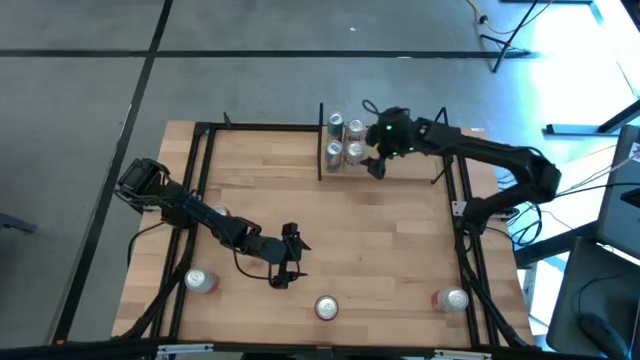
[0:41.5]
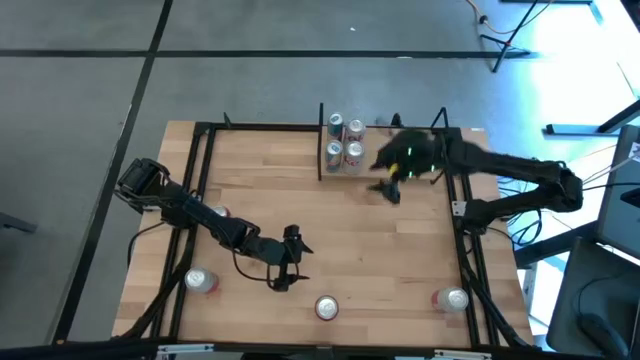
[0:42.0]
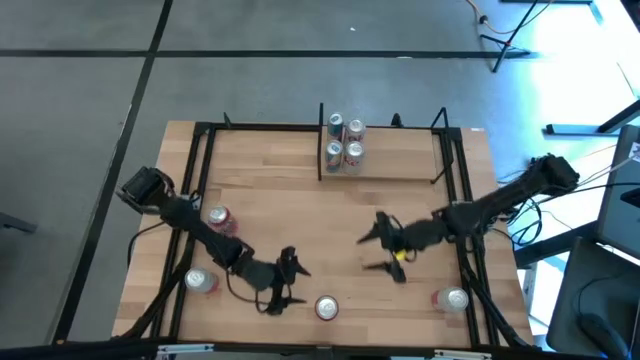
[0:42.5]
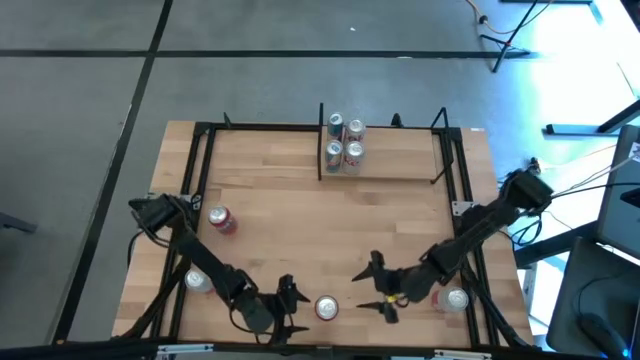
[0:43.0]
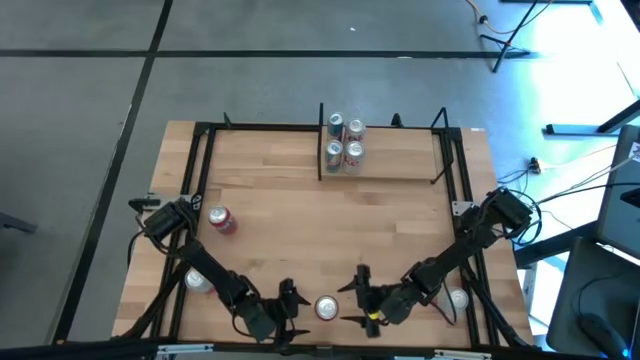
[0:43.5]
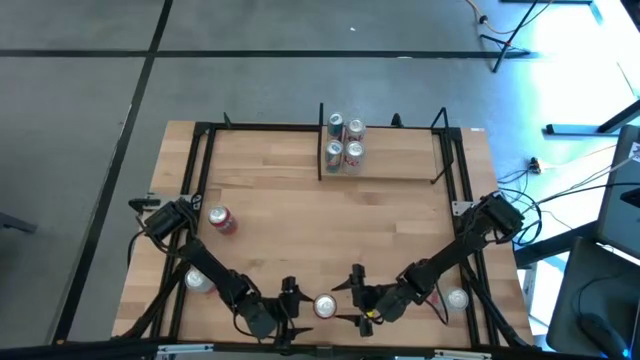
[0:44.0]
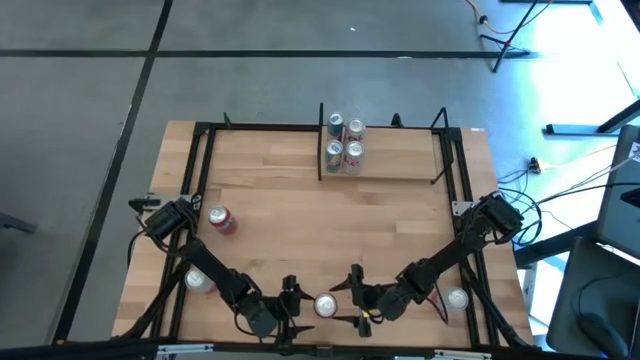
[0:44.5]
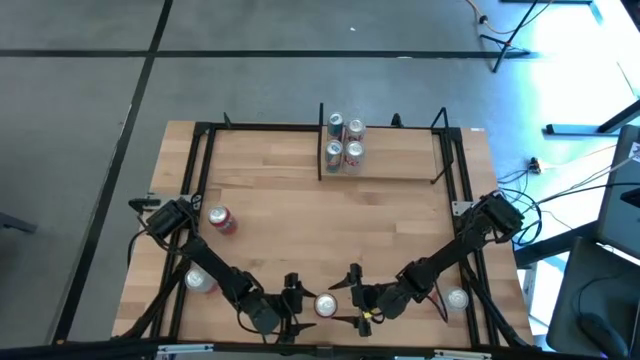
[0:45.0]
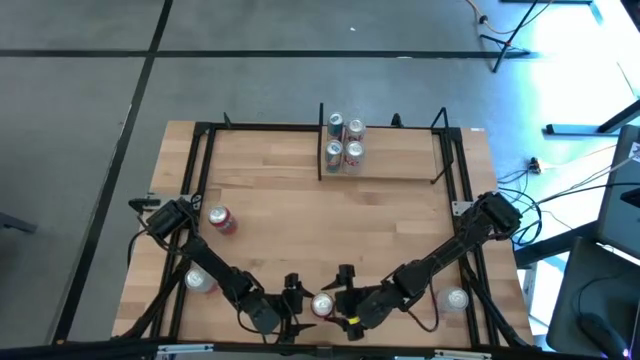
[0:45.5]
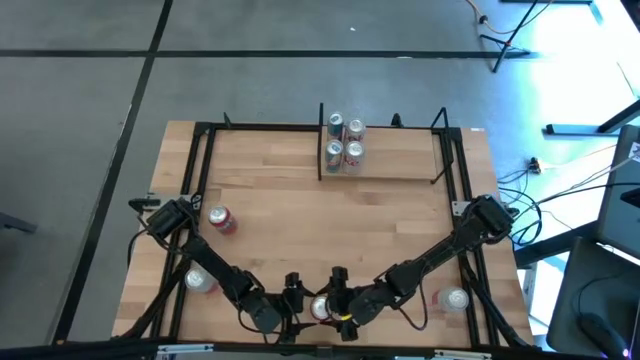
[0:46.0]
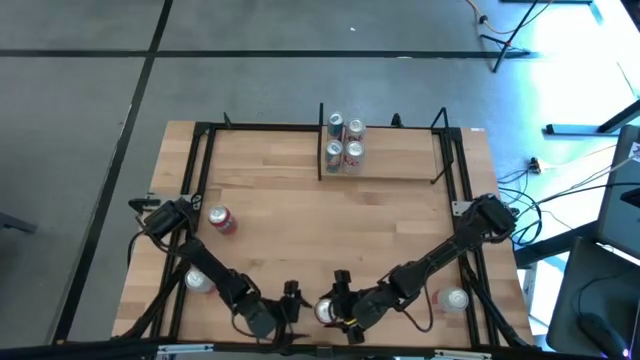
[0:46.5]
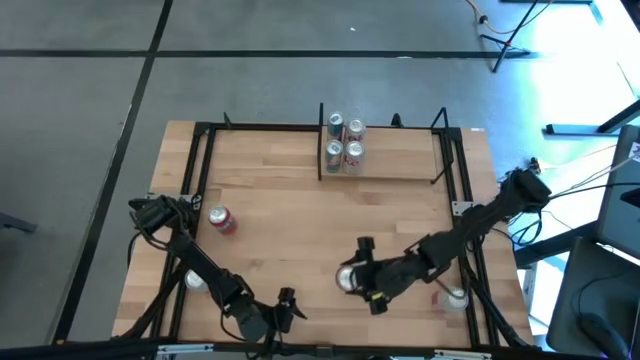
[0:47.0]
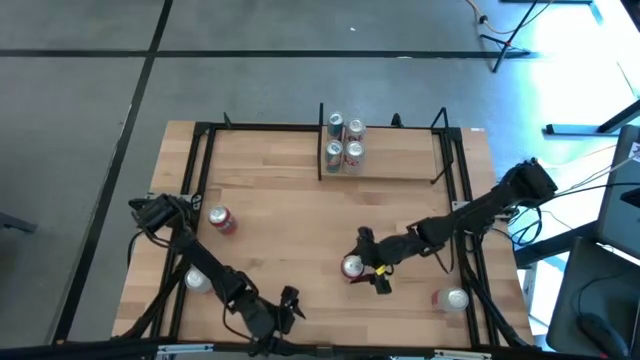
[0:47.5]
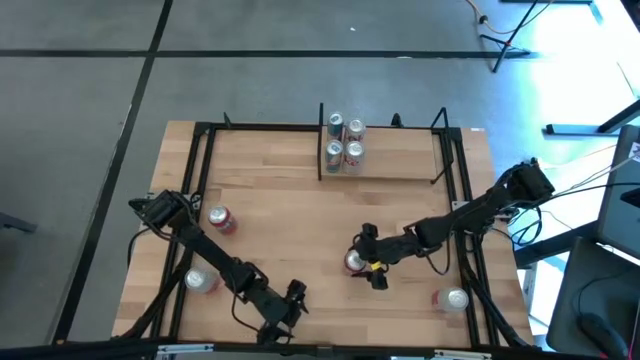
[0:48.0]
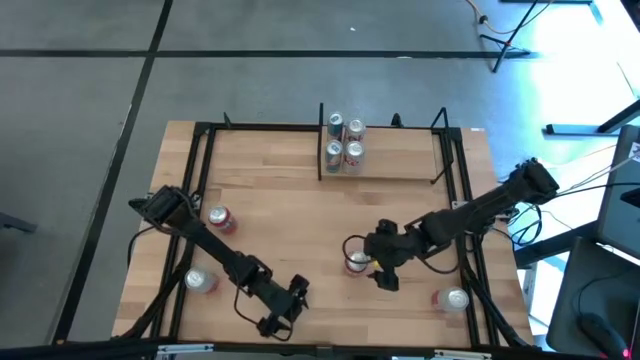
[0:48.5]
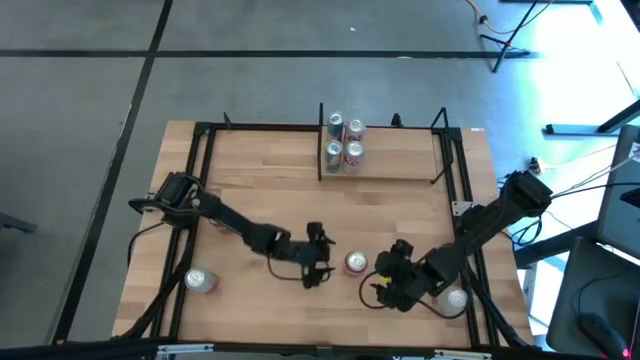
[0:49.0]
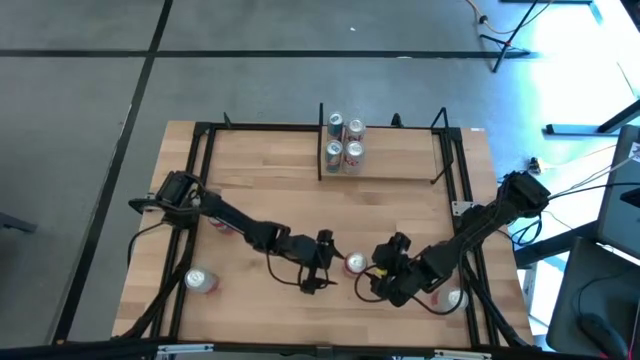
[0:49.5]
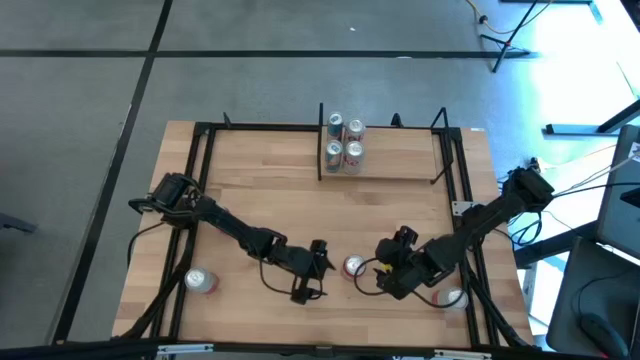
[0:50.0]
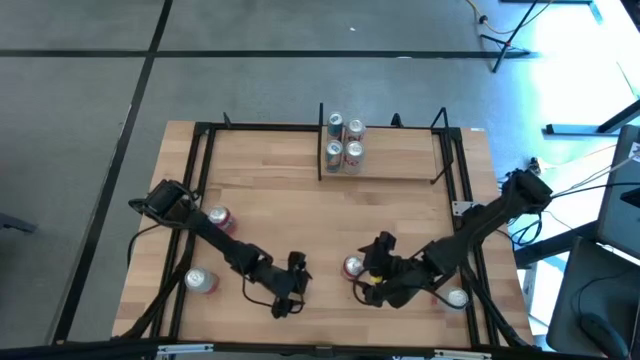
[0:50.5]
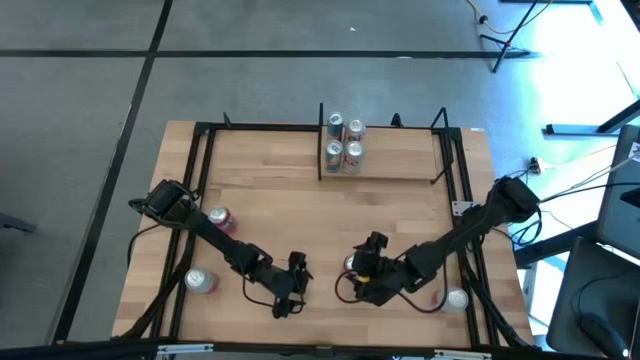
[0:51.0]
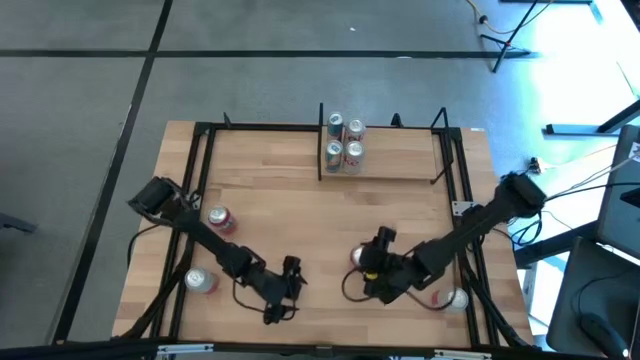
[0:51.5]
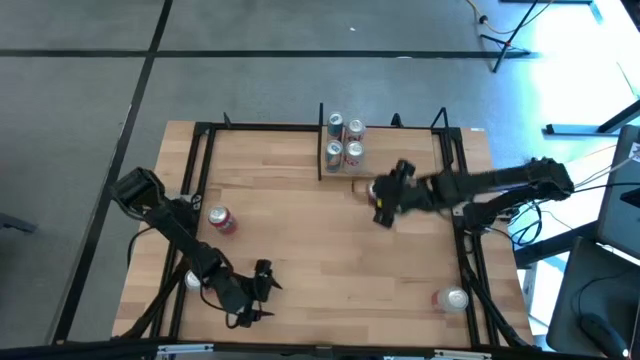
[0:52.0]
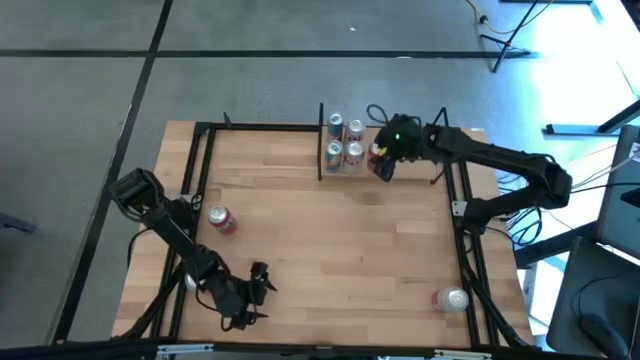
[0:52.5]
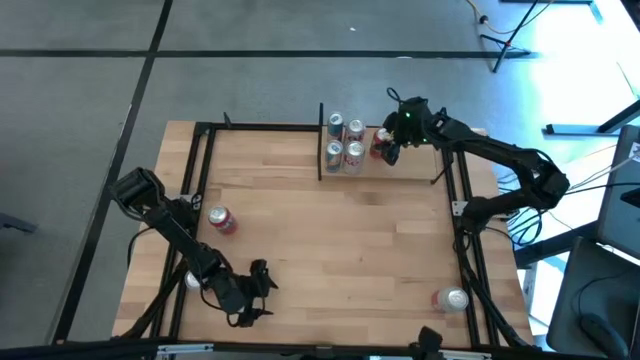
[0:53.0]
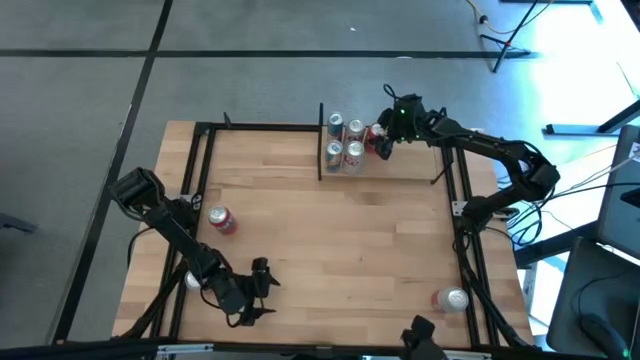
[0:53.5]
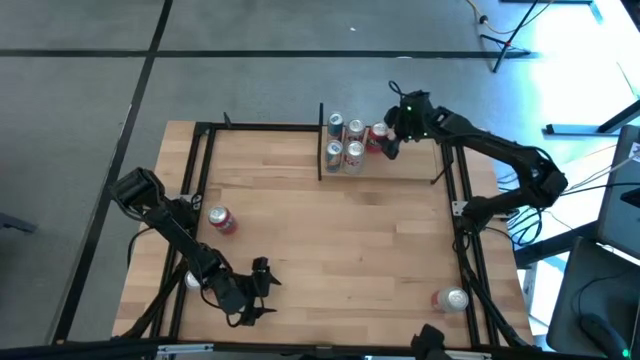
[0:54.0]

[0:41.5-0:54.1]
Task: Place canned beverage on shelf
Put the bottom red soda can on the shelf

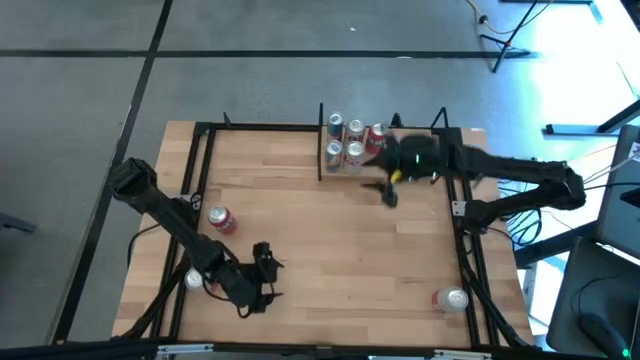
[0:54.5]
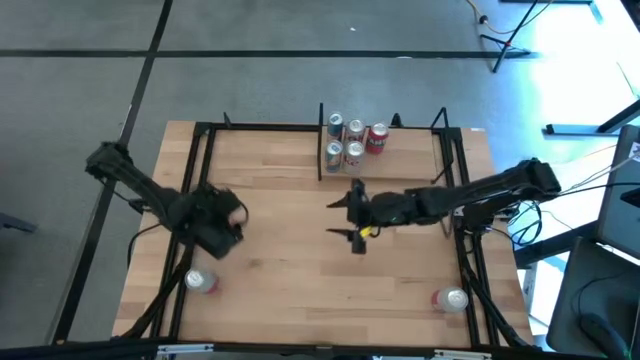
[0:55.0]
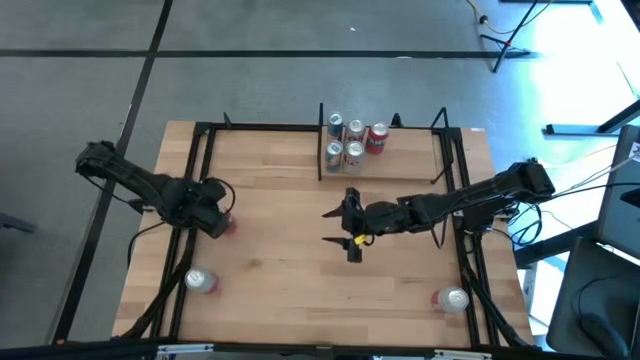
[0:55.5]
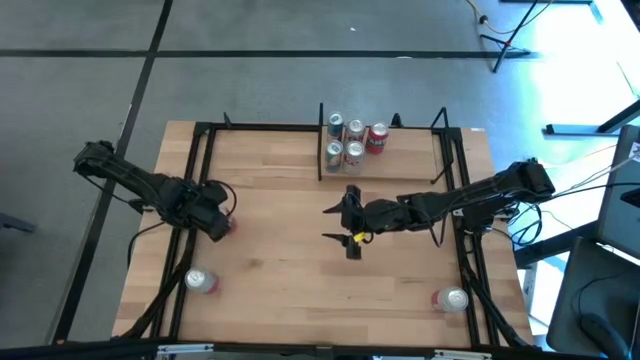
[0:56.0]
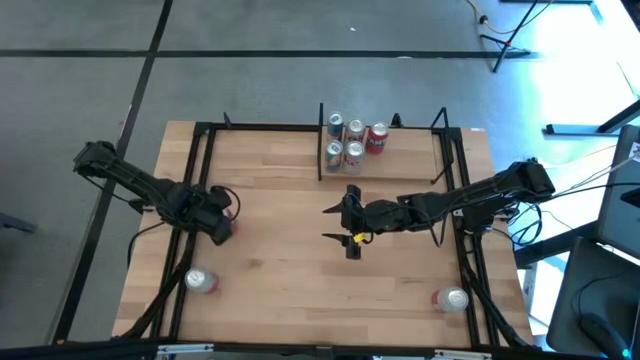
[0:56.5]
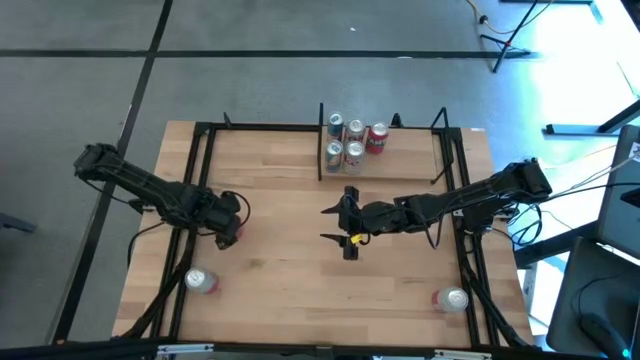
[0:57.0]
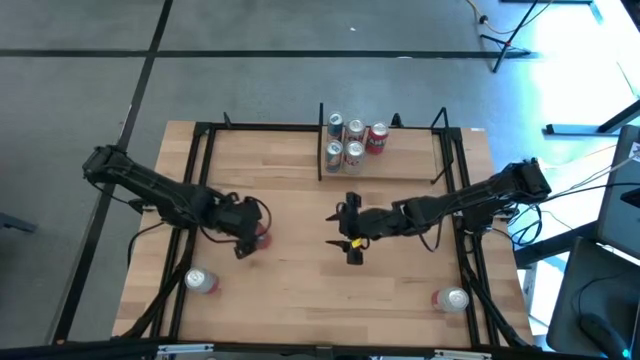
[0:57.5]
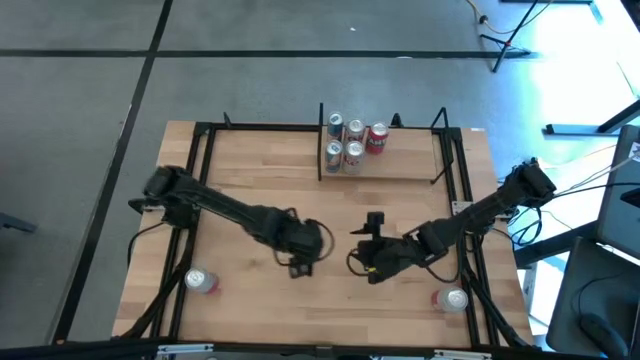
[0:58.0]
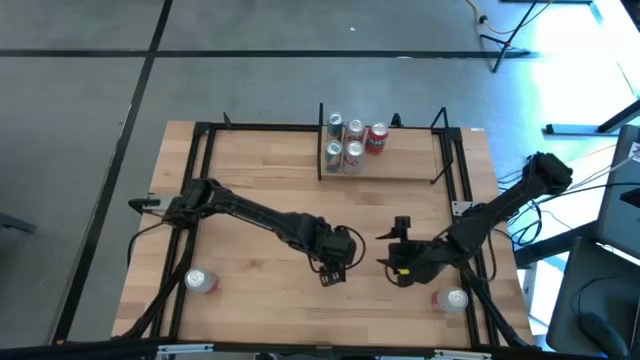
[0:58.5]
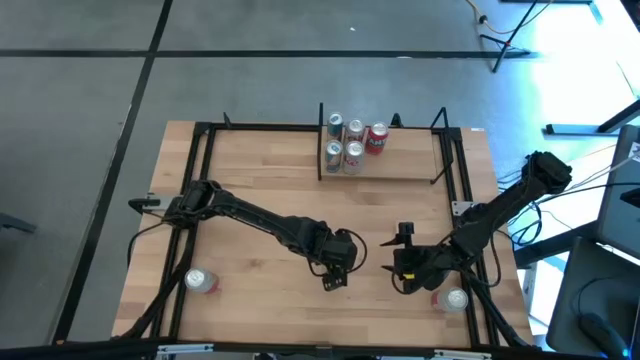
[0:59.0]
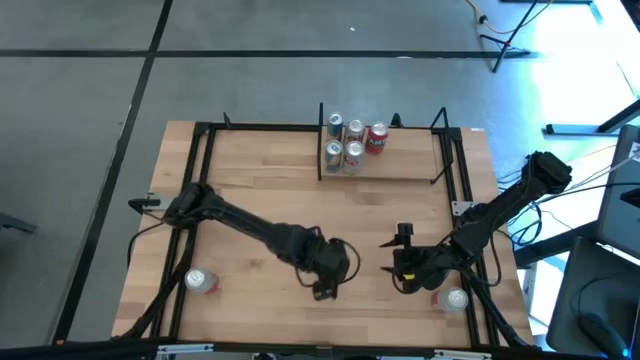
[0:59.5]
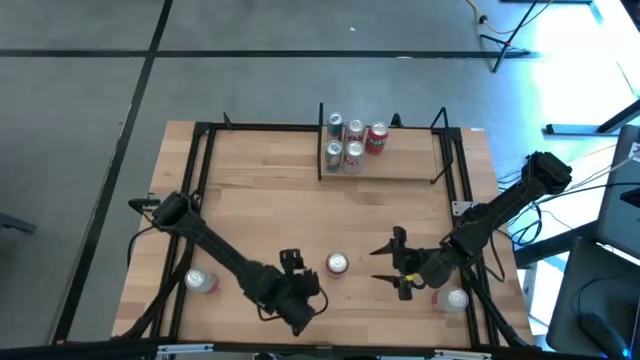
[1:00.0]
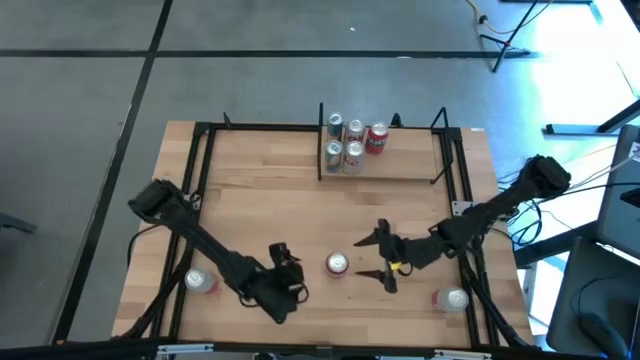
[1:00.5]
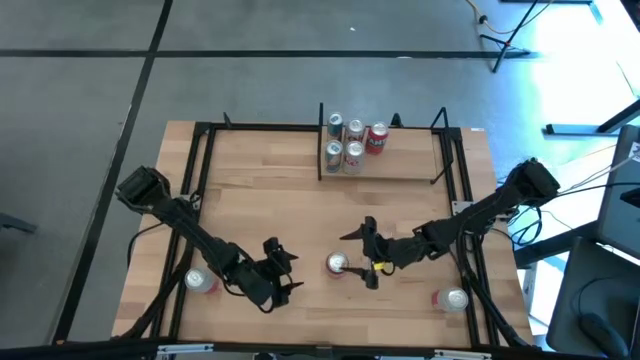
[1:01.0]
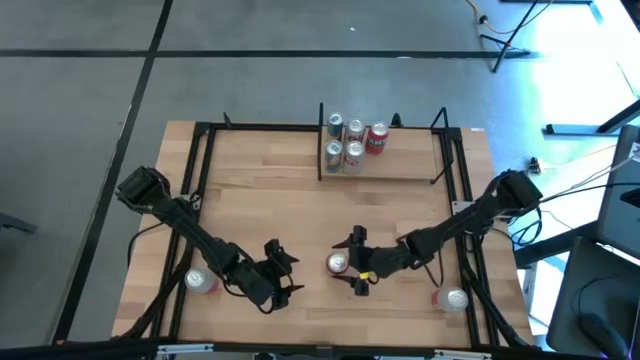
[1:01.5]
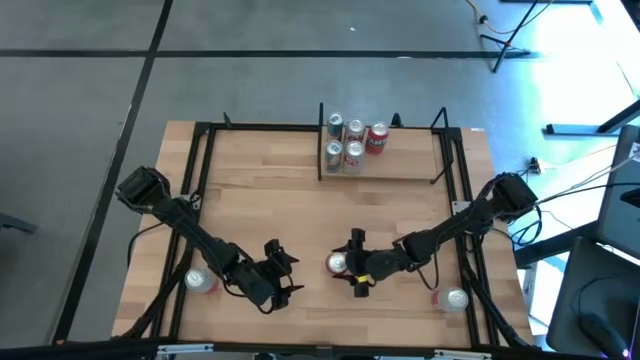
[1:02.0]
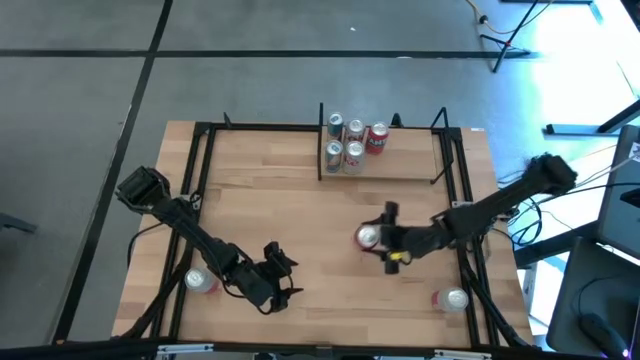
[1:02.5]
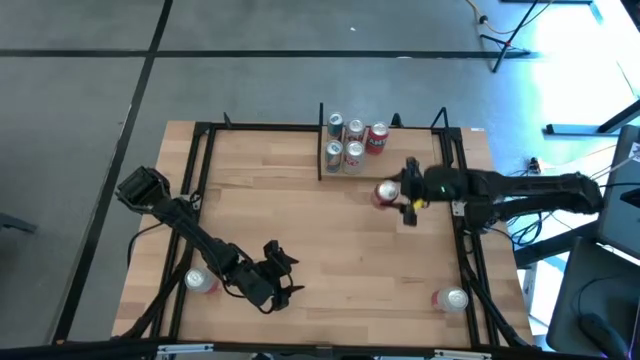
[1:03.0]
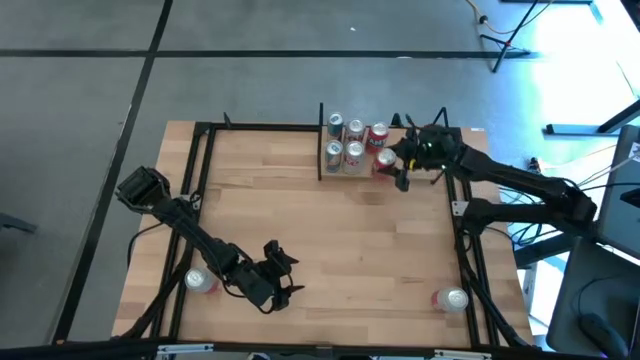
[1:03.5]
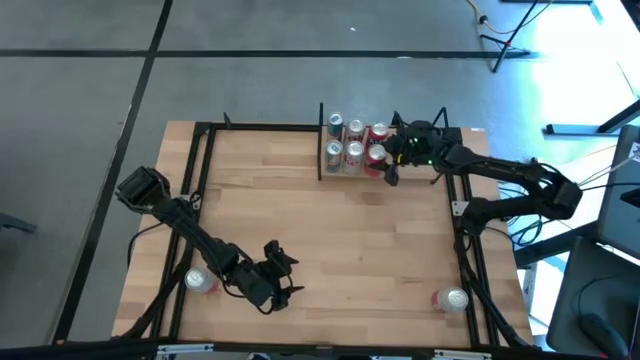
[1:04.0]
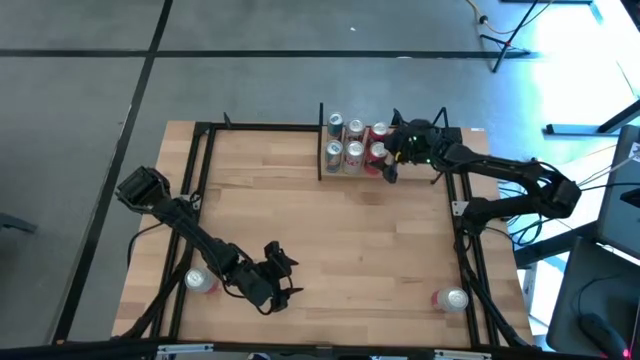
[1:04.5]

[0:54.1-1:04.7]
Put the red soda can aligned with the other red soda can on the shelf
